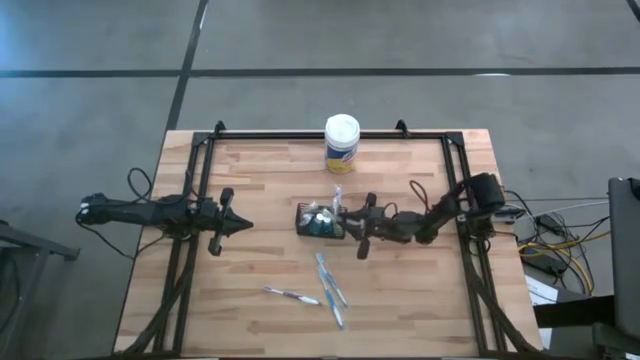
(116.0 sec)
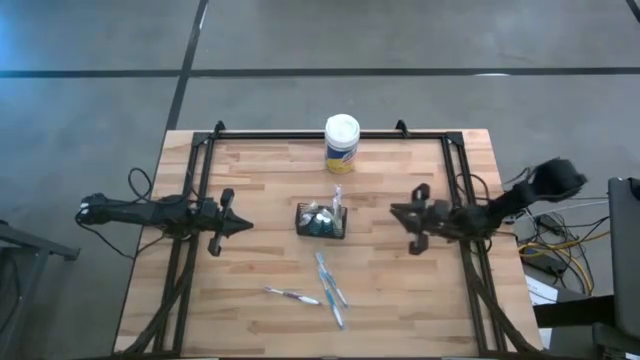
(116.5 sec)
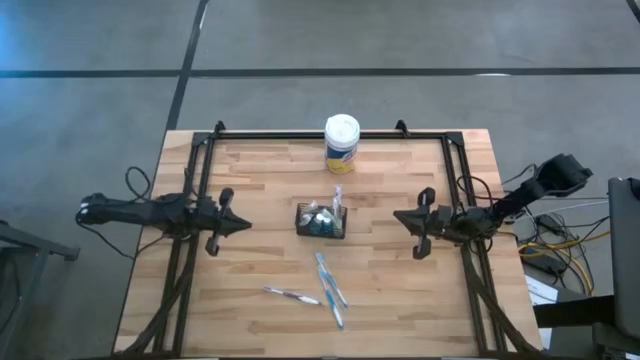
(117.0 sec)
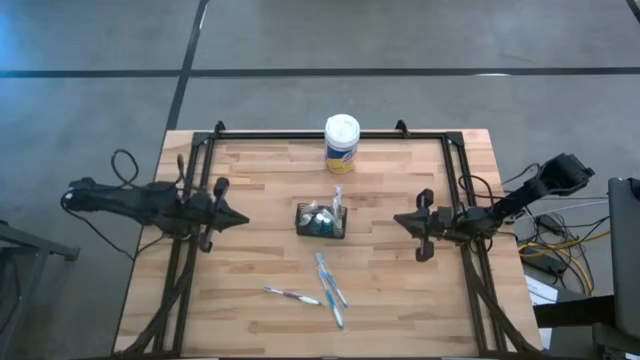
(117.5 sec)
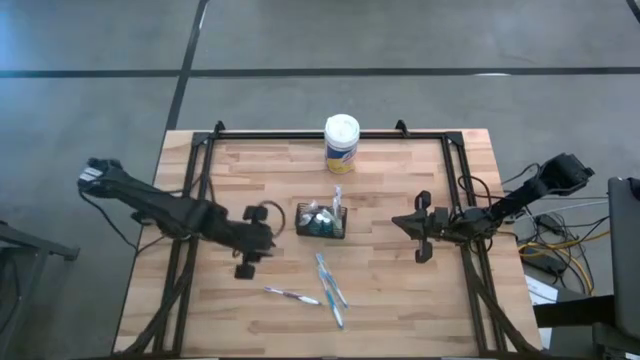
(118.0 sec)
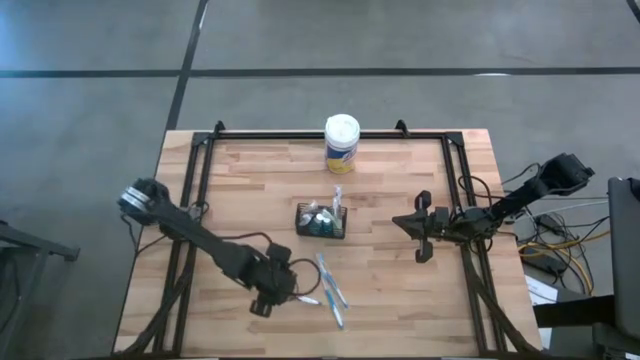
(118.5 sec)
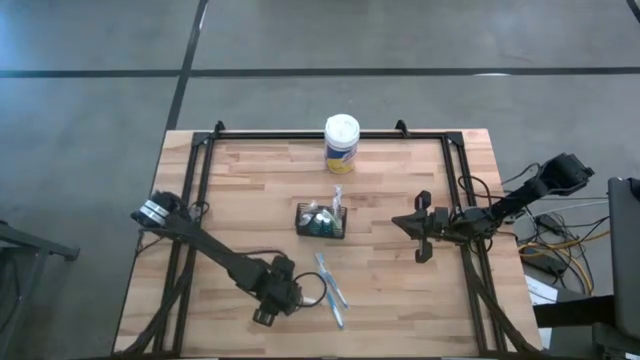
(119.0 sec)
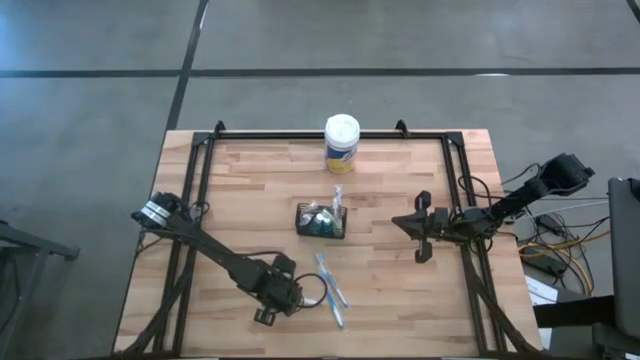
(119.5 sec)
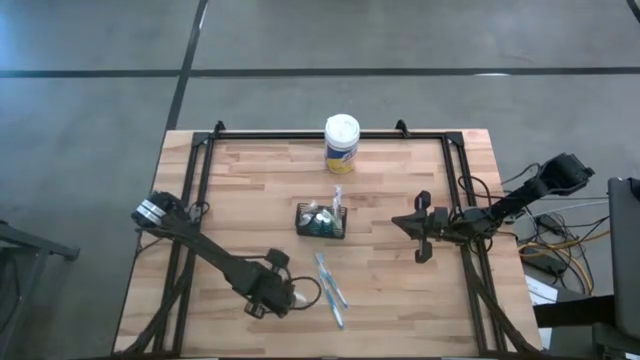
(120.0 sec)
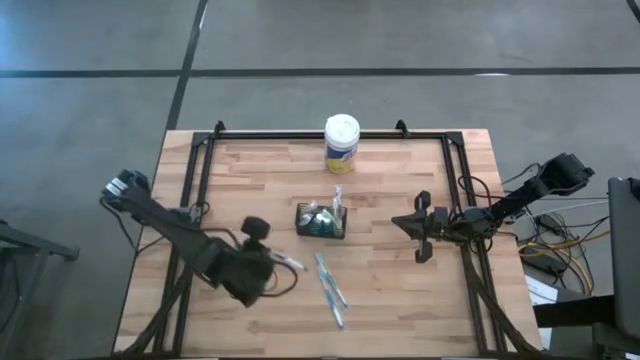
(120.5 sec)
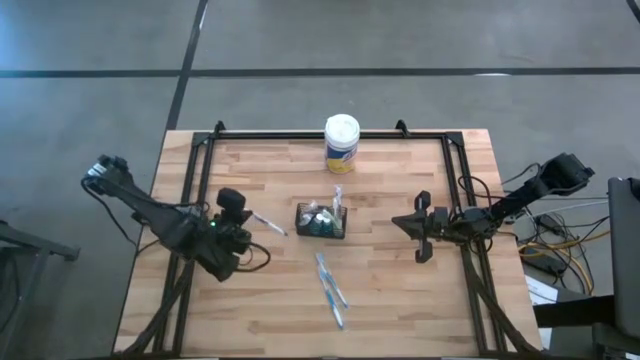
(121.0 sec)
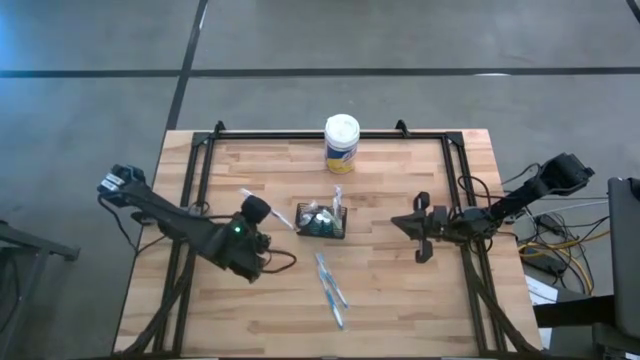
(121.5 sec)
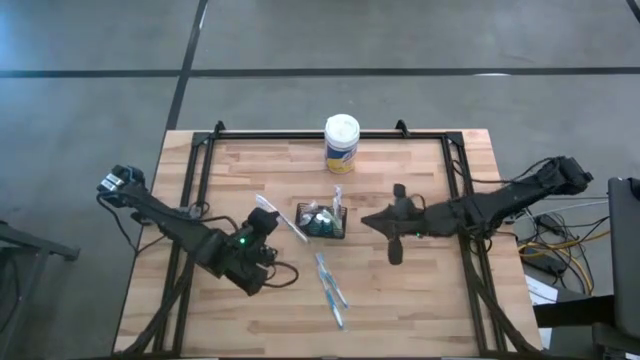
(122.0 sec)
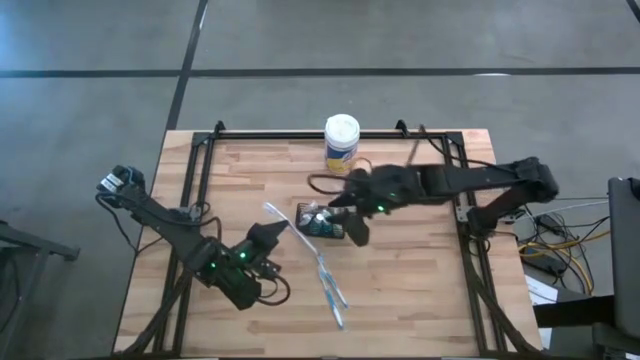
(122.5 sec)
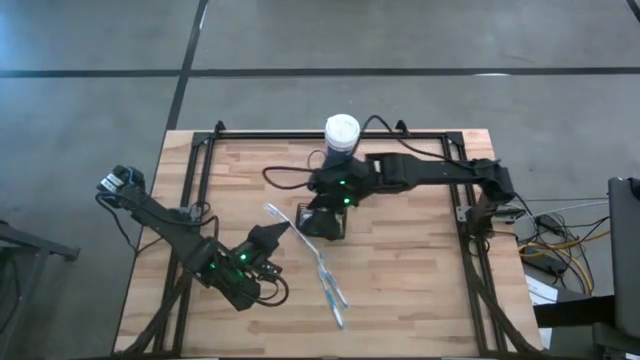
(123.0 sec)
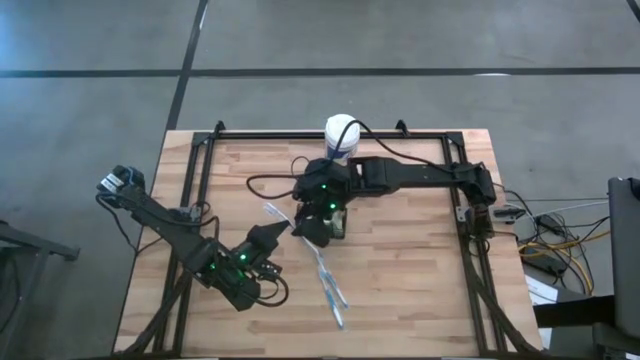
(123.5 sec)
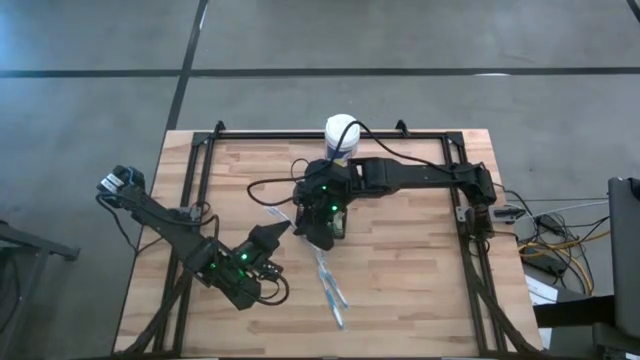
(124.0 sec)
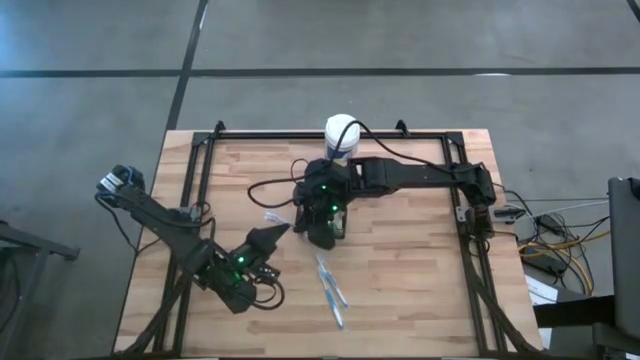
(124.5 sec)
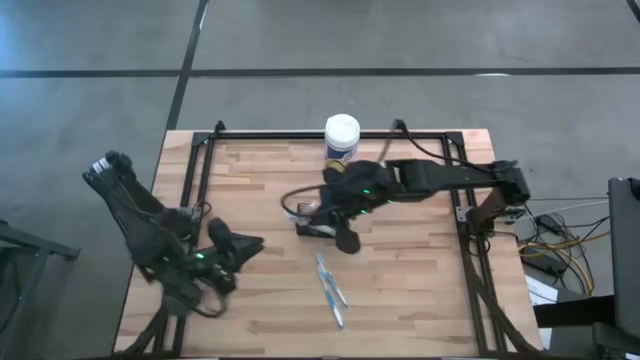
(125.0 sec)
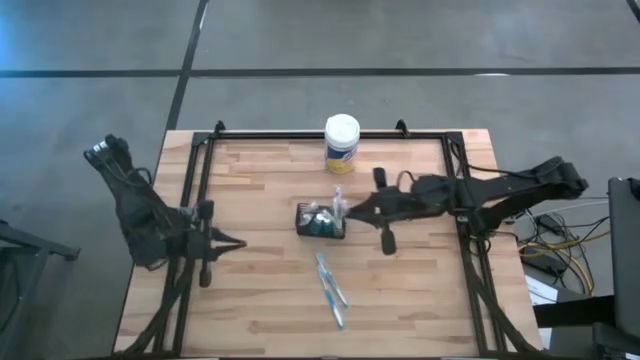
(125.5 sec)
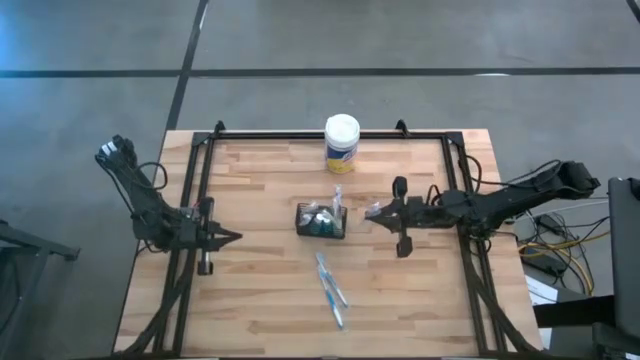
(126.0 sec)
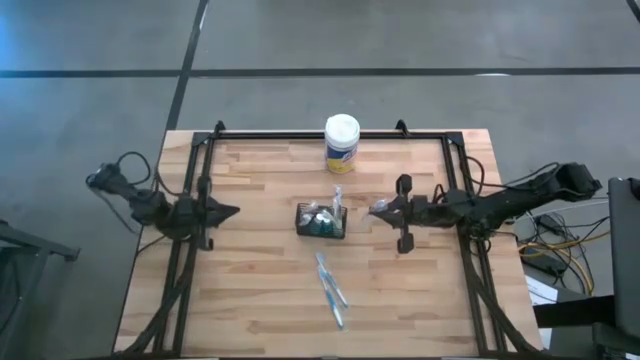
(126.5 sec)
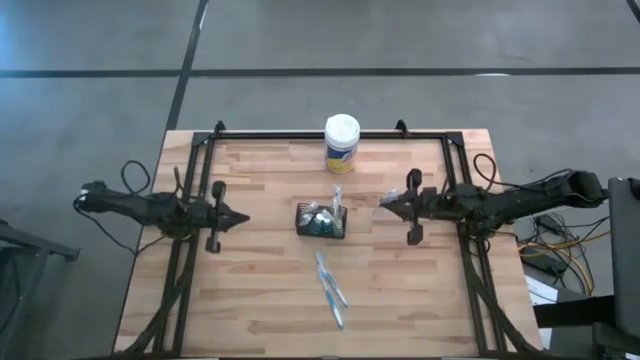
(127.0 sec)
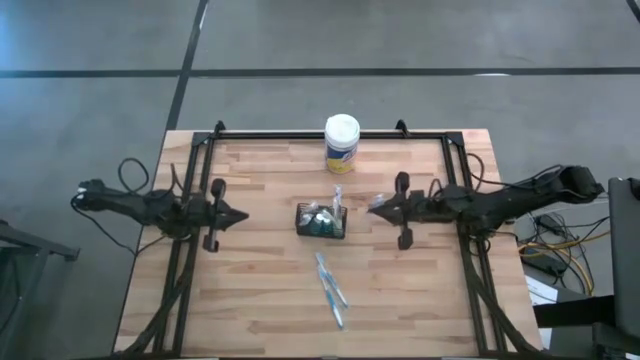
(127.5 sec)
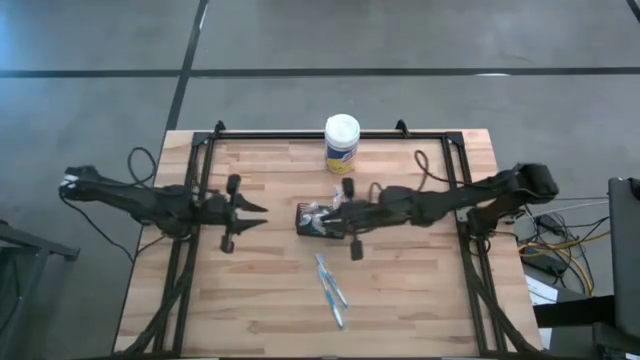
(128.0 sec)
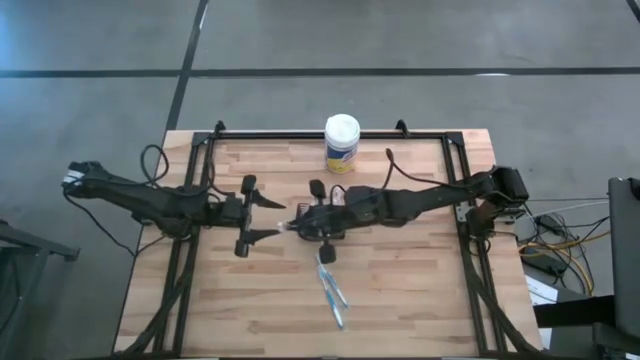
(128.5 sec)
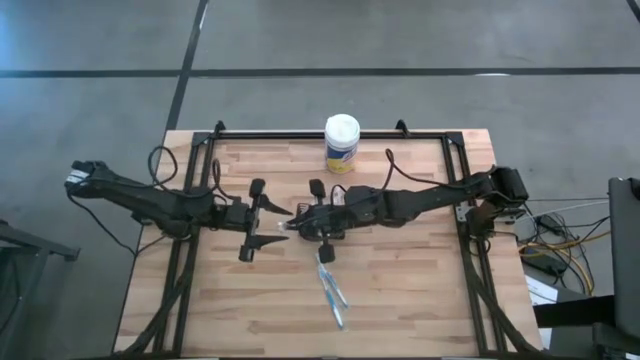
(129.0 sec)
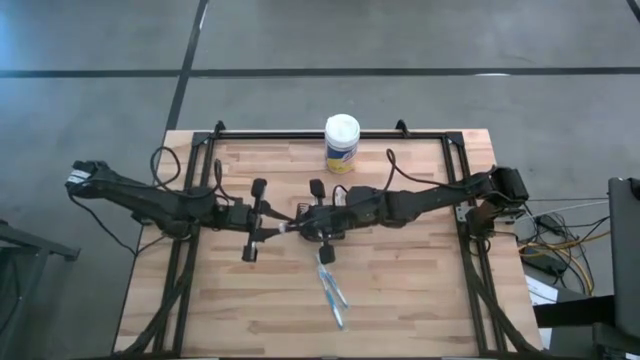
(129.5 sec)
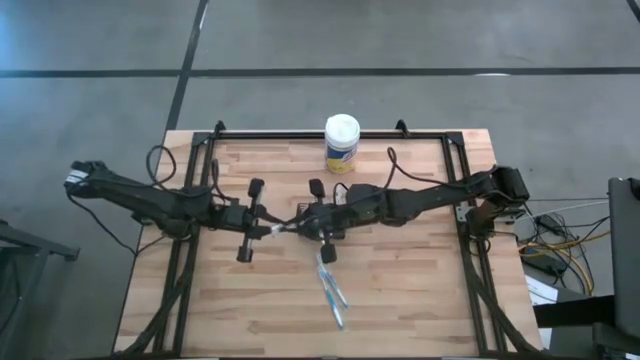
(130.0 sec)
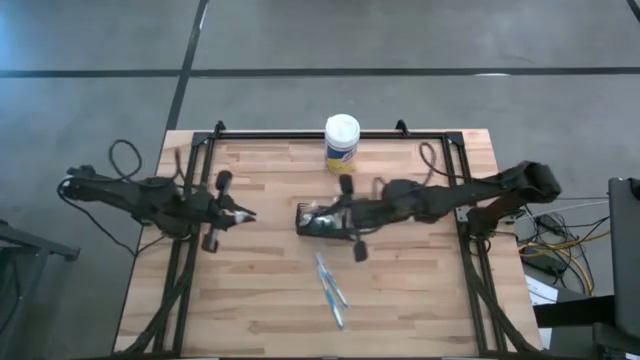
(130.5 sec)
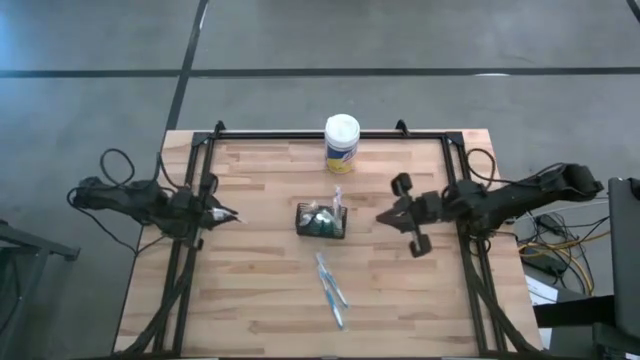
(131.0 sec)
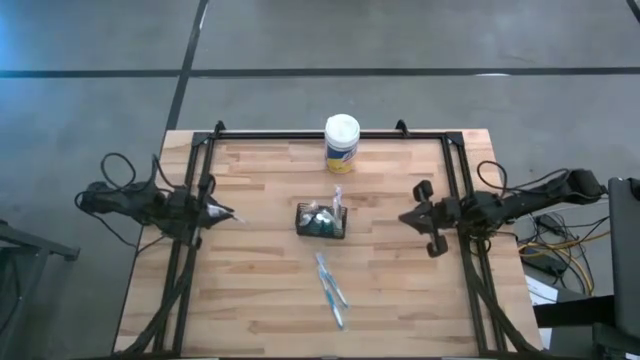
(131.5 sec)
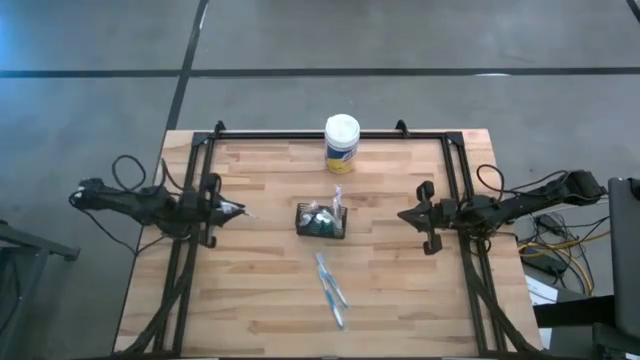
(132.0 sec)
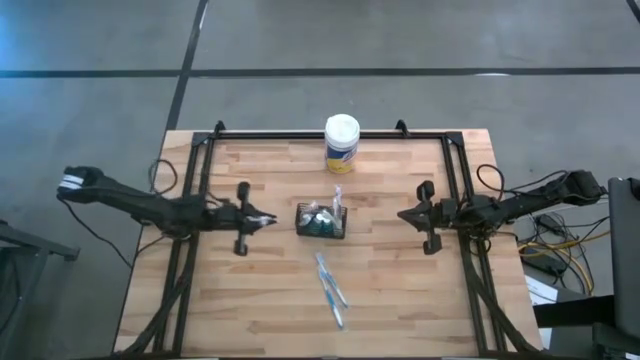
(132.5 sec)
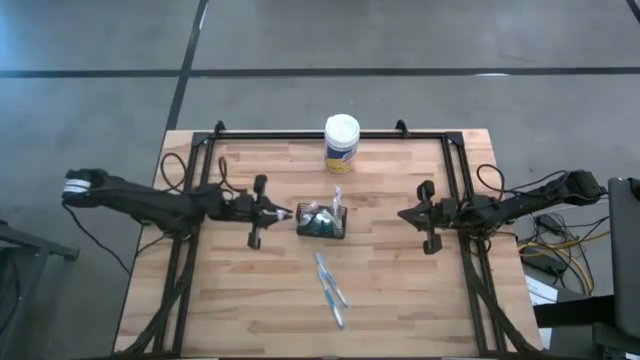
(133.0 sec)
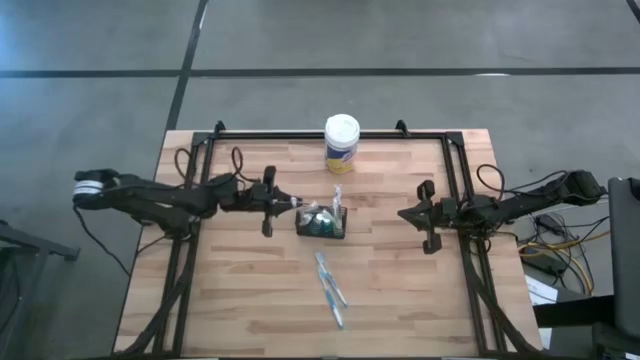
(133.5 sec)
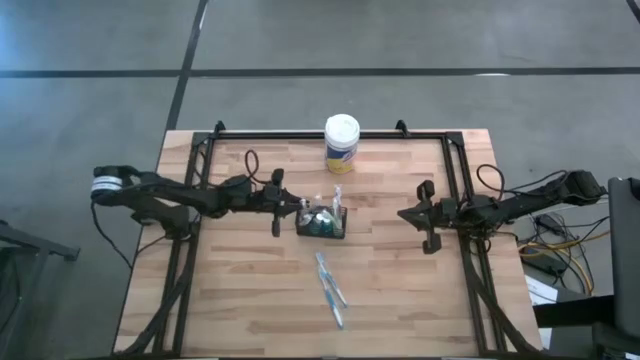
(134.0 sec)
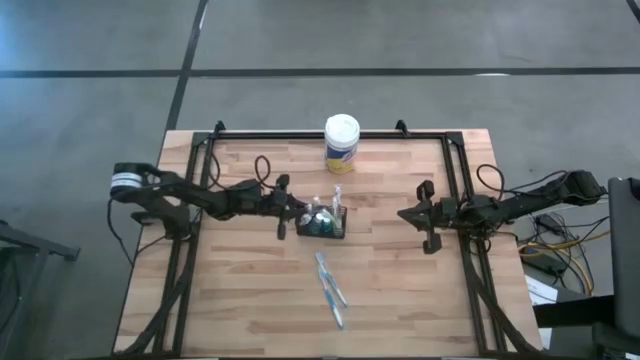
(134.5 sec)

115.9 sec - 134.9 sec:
Task: Pick & Place toothbrushing station
Put the purple toothbrush into the wire organizer

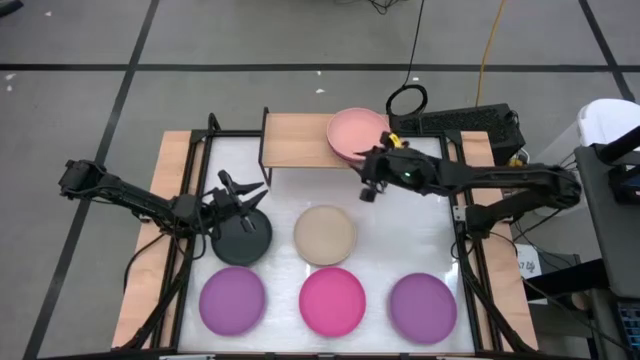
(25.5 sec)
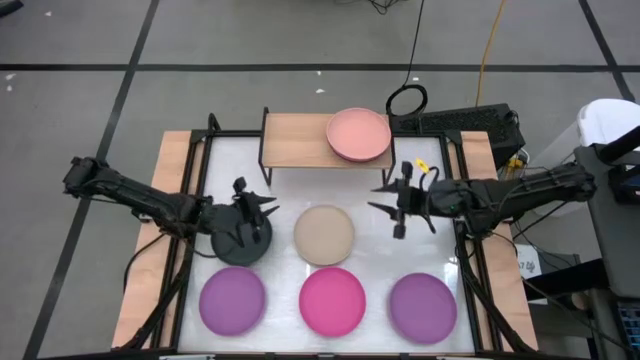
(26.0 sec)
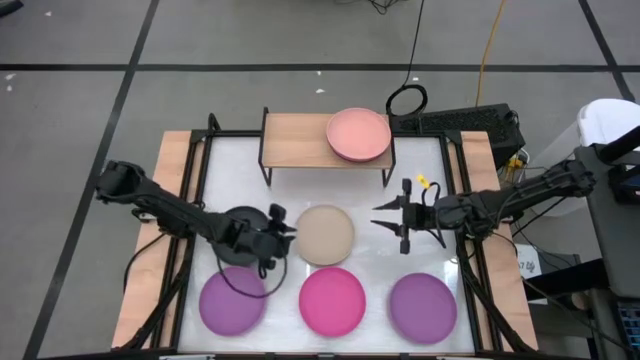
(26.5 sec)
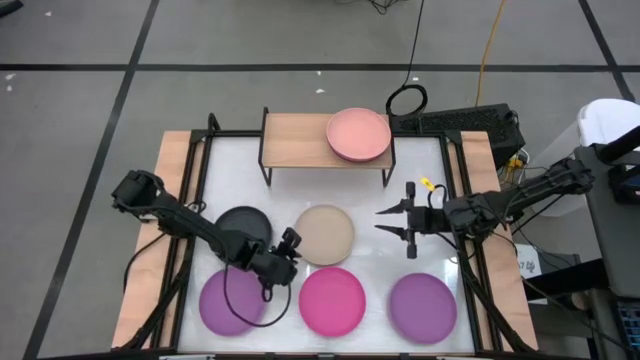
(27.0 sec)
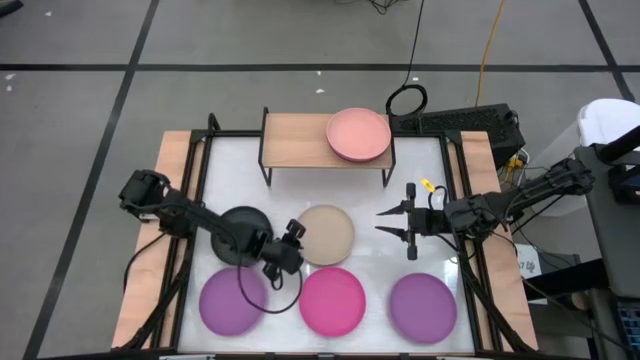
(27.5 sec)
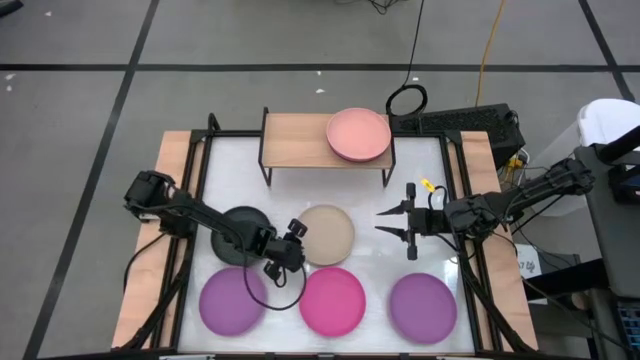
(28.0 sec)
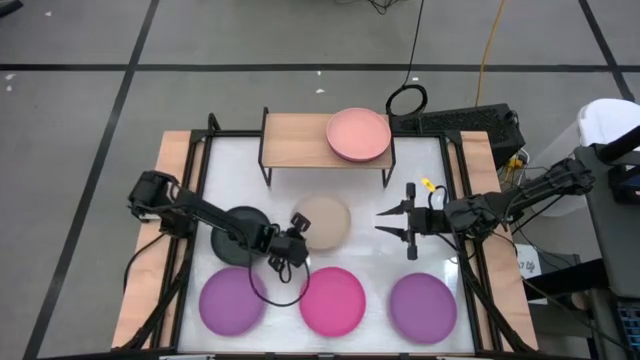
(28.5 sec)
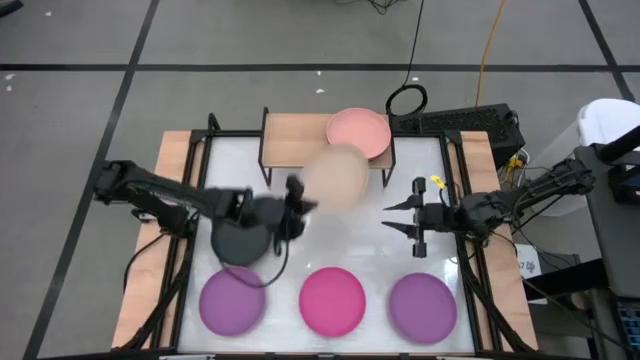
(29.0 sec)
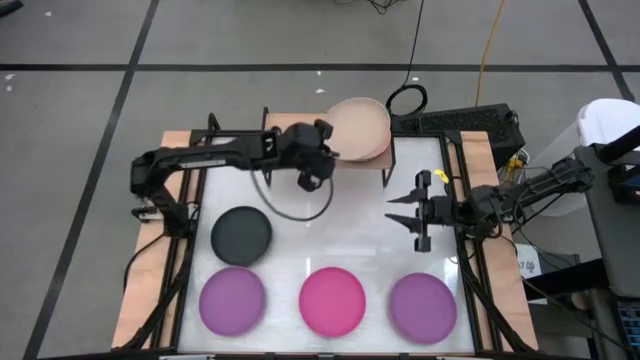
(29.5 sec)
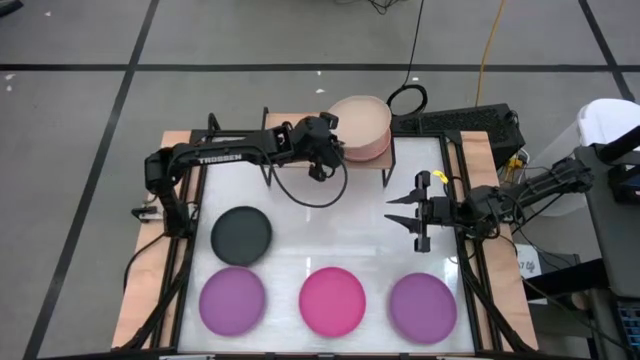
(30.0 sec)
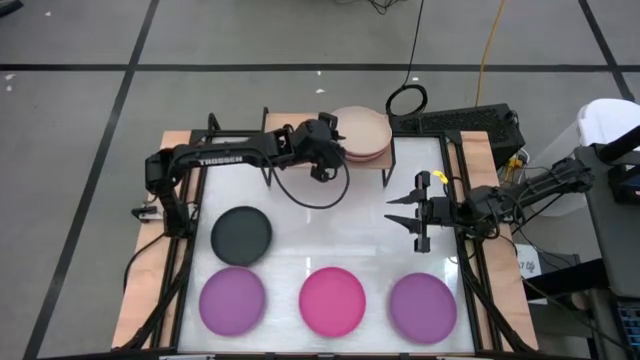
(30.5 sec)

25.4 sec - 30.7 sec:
Task: Place and stack plates onto a shelf
Stack the brown plate on top of the light orange plate on the shelf
